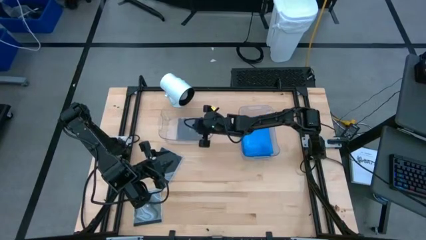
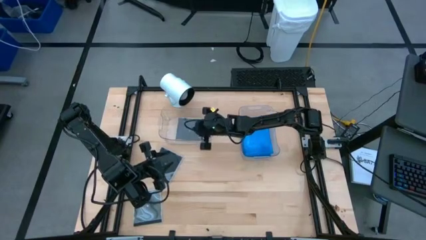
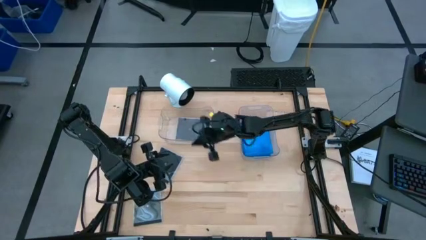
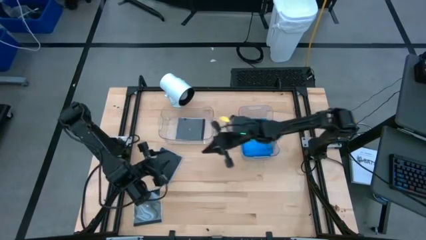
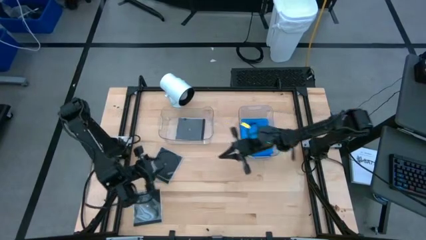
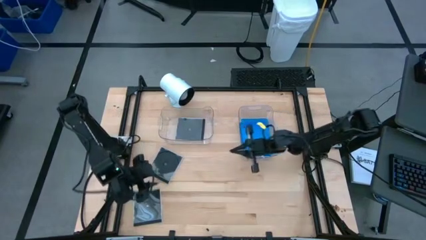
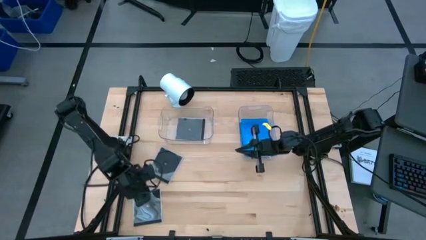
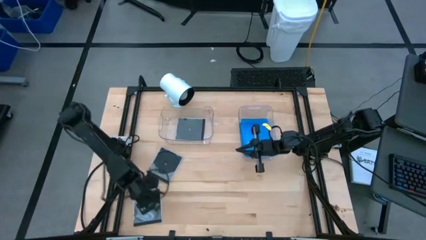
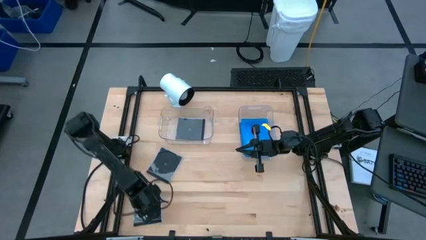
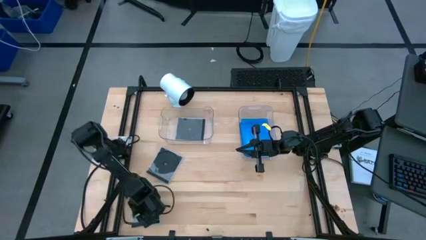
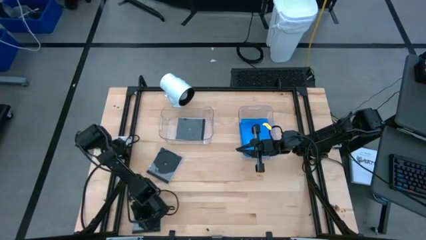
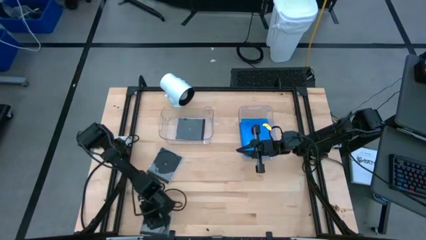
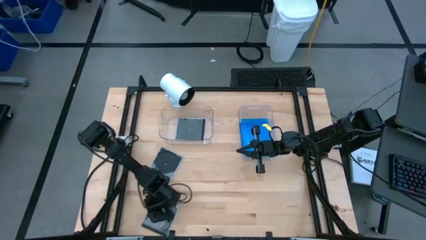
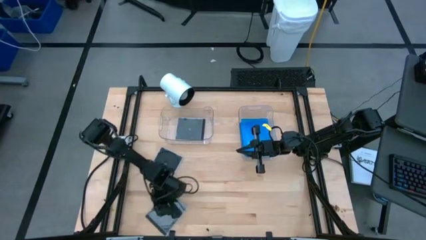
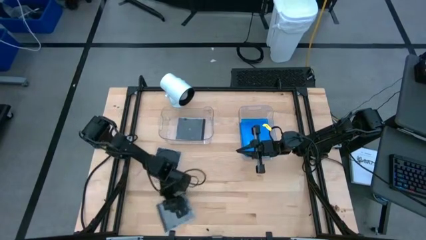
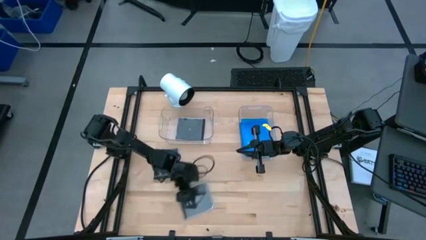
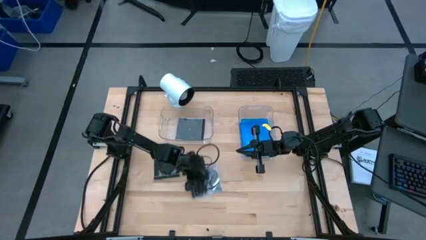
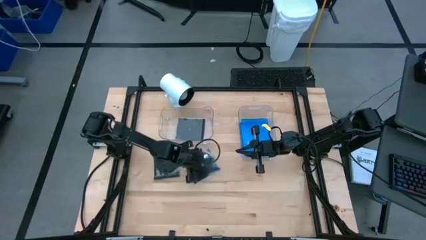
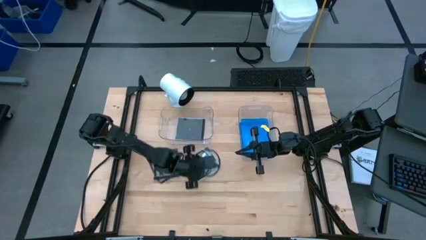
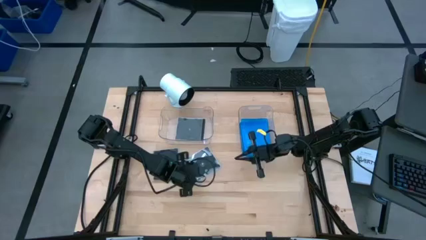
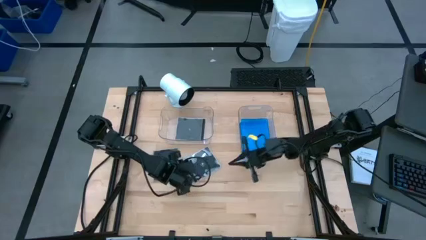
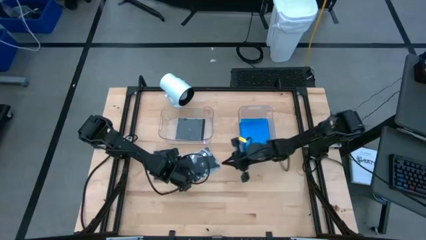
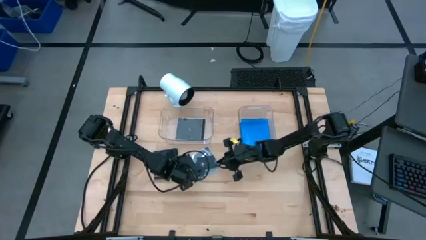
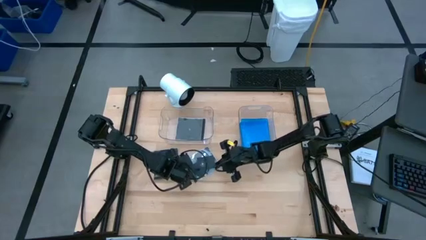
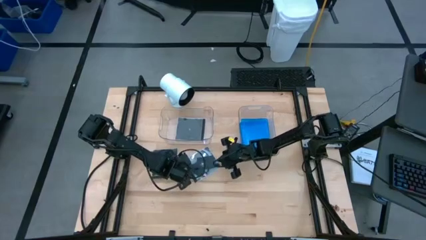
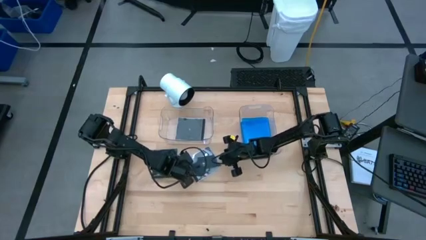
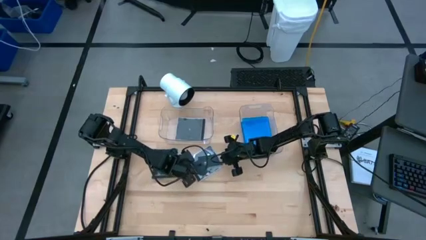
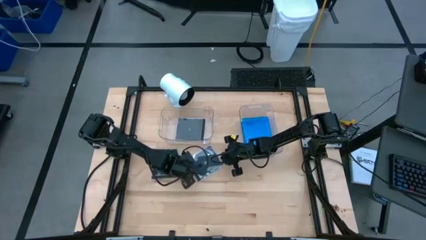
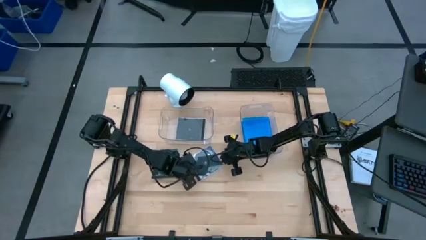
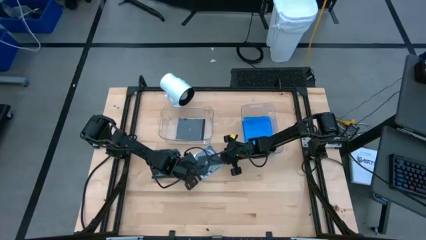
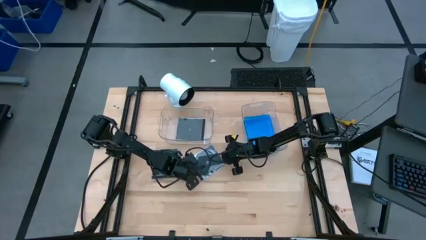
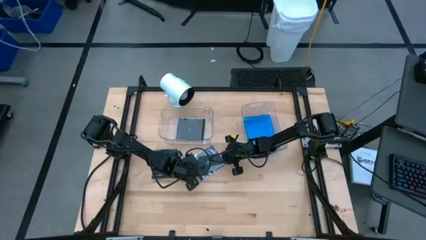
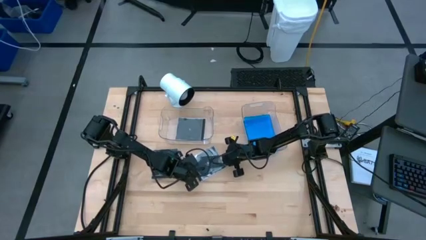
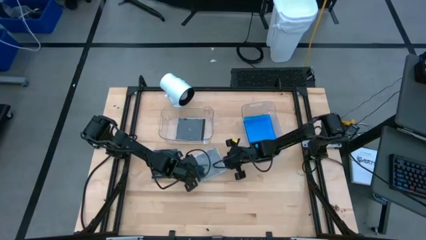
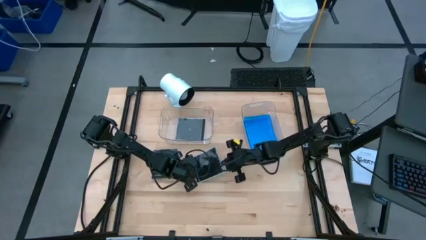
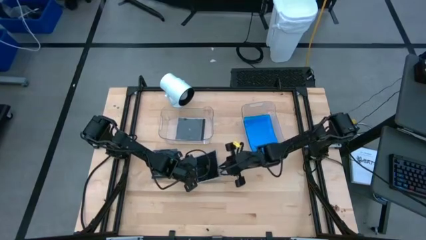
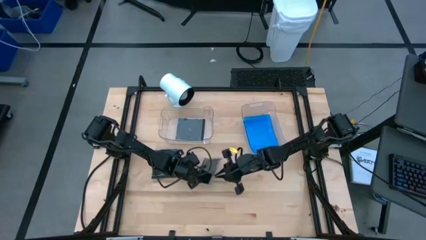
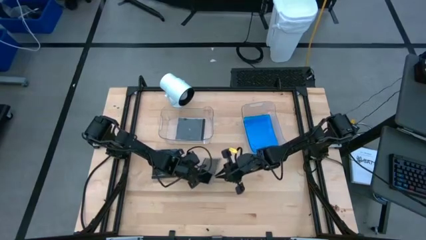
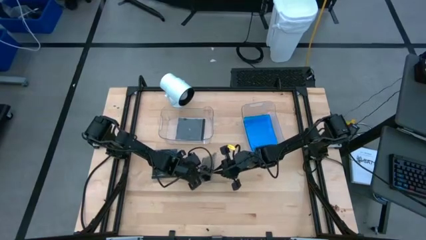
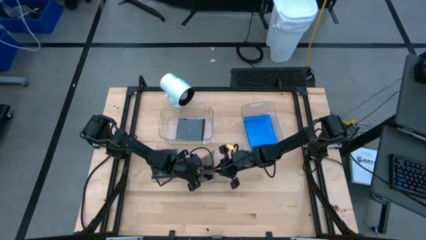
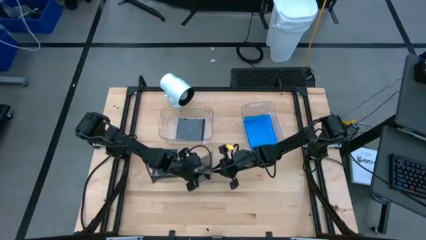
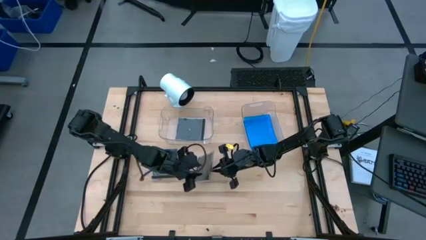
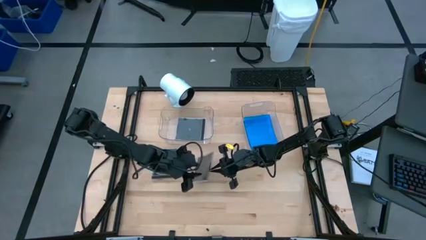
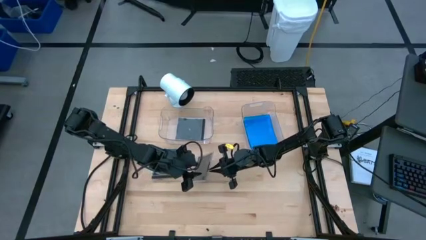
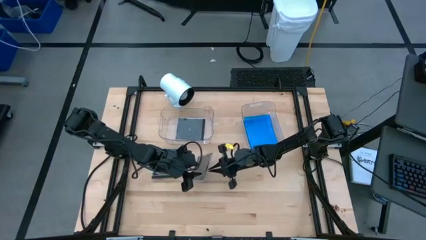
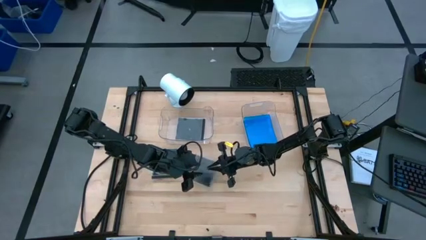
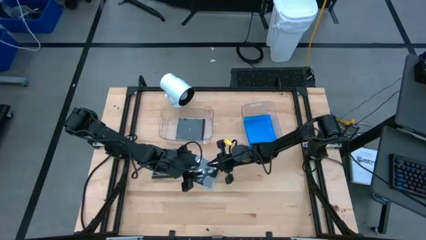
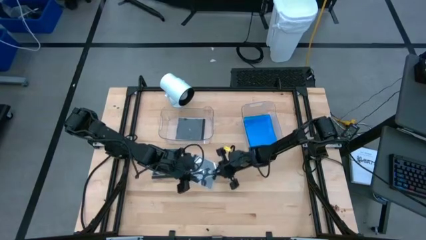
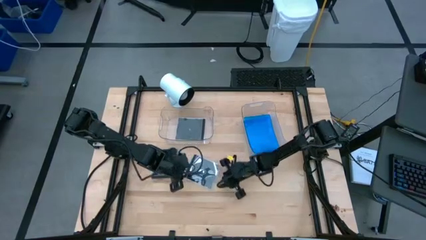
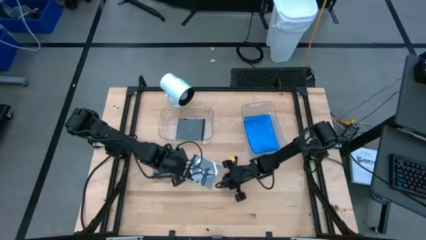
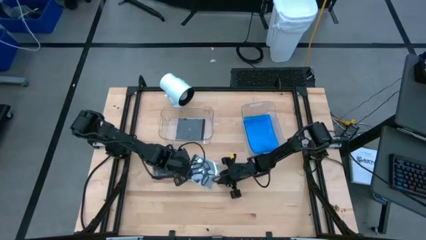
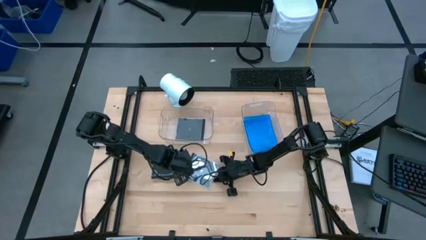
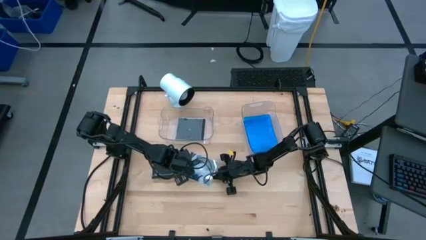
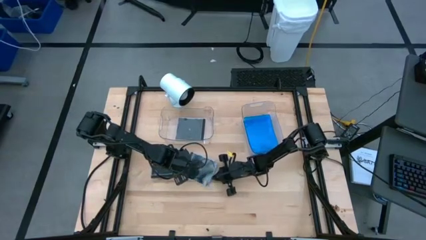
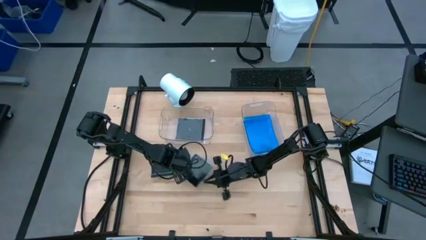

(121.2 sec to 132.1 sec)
Task: Pick & place jewel cases by type
Put the bottom black cd case into the left transparent bin
